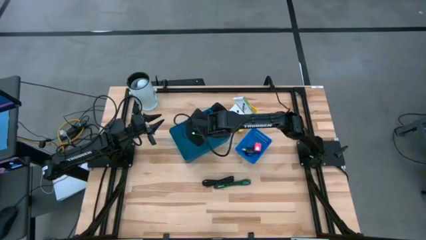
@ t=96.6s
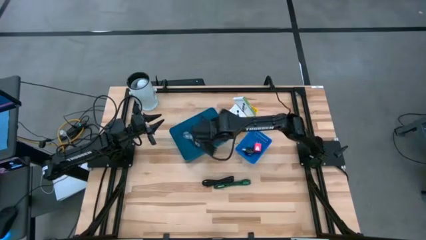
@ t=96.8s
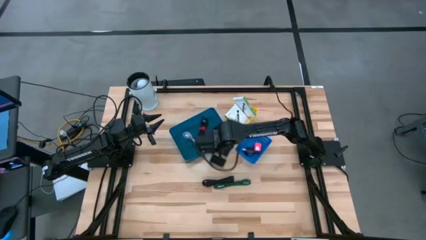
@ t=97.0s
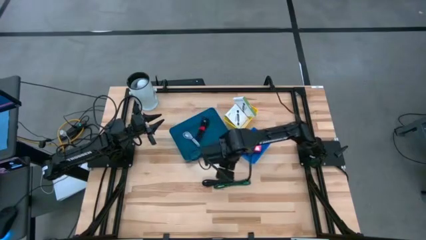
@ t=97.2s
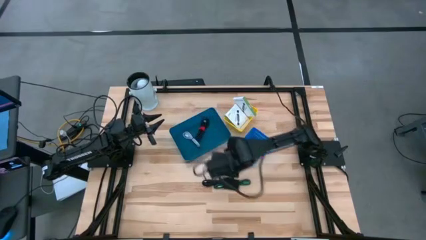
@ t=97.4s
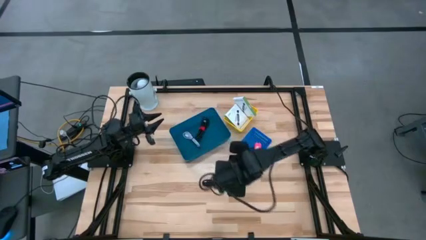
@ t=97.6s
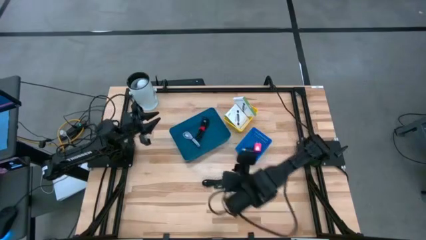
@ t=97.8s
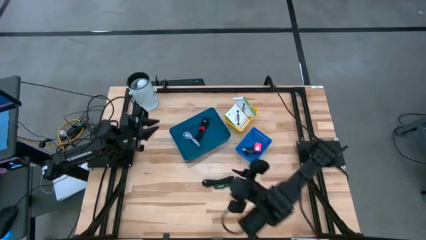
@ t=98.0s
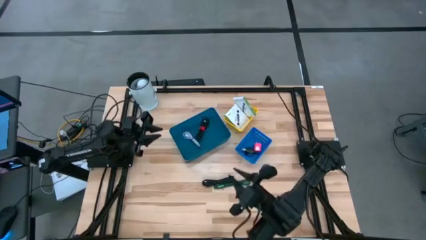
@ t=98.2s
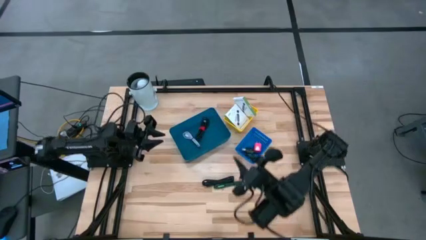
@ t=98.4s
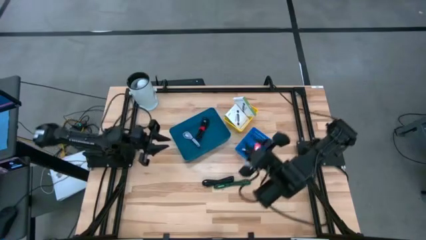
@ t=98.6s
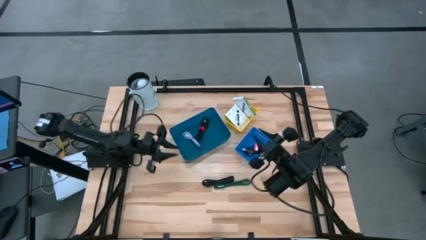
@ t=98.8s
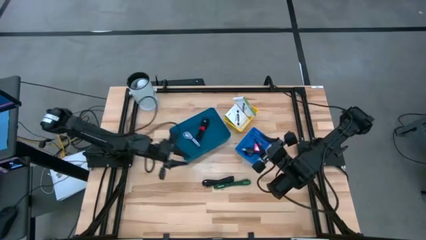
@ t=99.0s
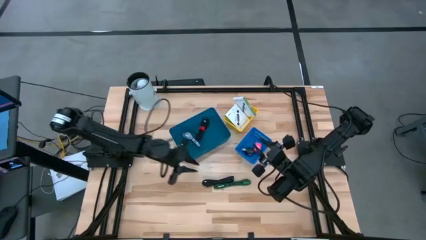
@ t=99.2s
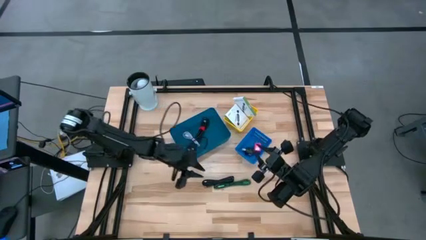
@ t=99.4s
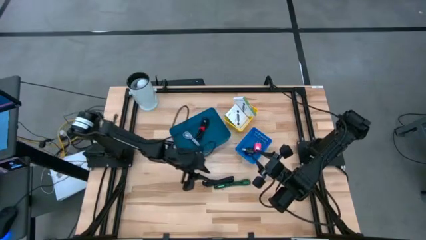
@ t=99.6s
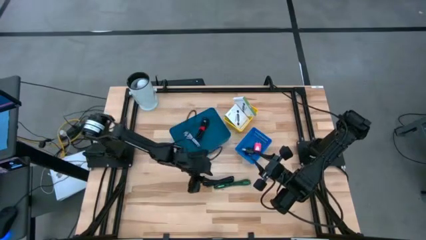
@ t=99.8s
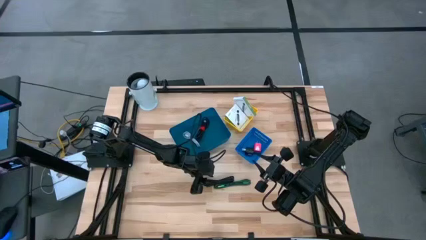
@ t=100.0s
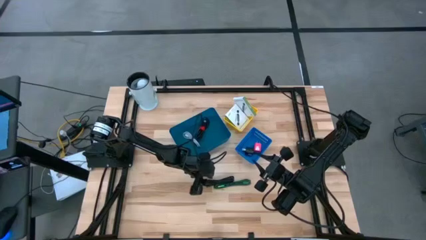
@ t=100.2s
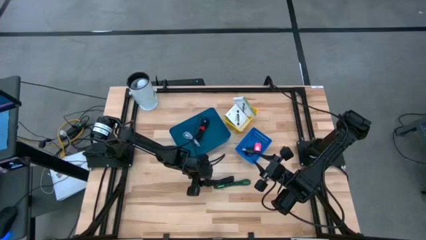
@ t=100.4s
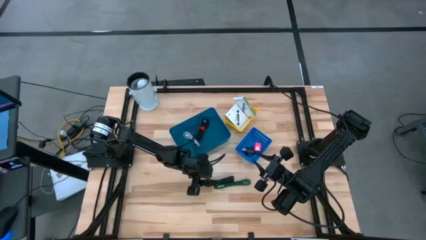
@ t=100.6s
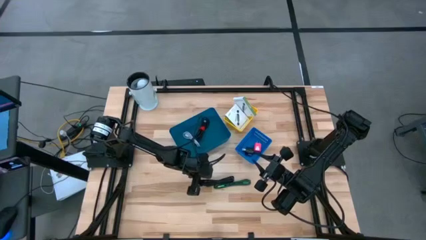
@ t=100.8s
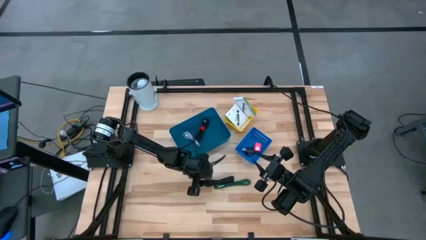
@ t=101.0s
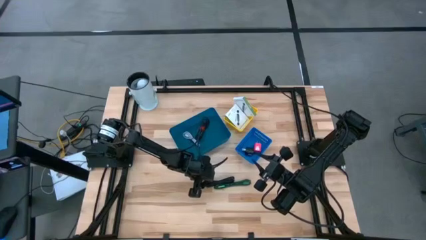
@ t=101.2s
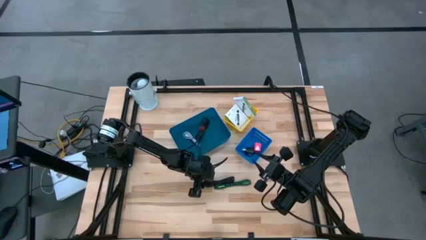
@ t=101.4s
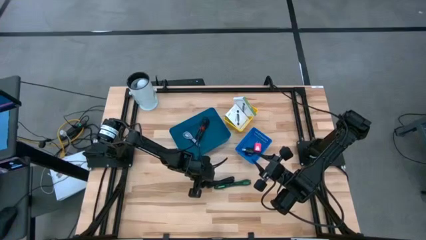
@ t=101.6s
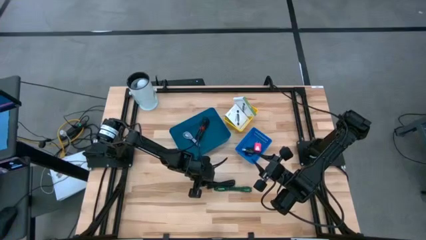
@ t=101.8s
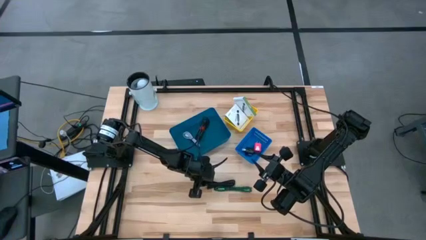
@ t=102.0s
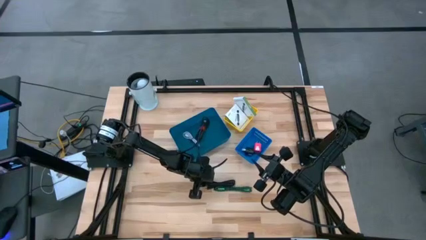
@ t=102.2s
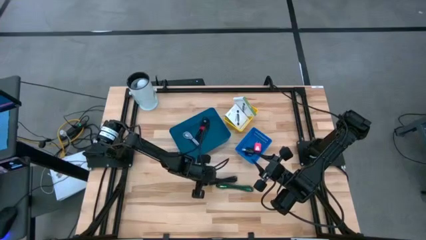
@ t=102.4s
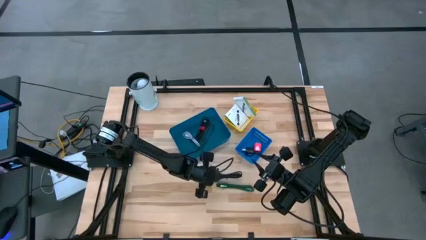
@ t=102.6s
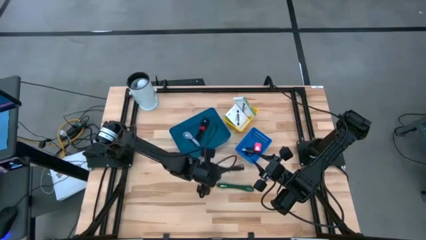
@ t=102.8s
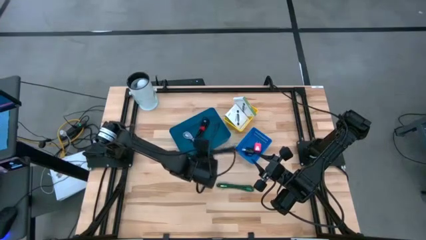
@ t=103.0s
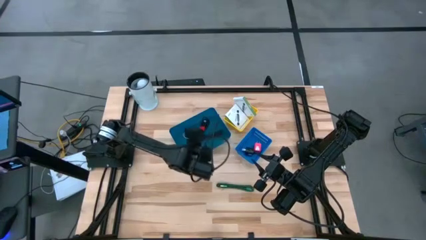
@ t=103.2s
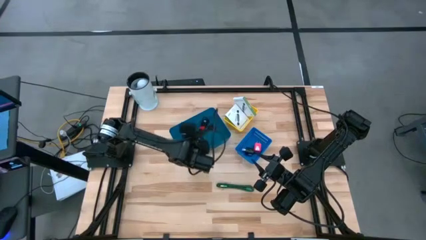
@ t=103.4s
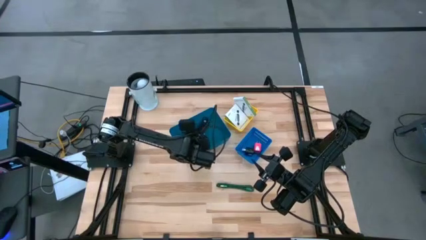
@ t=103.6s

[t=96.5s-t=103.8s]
Task: Pick and place items into bin
Put the black charger cable into the dark blue bin

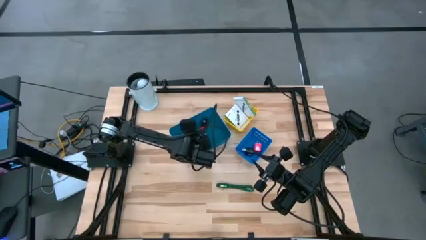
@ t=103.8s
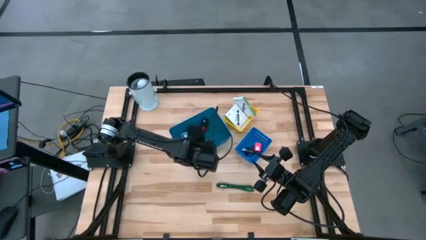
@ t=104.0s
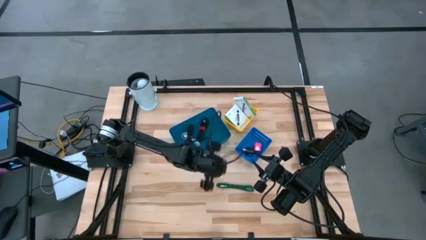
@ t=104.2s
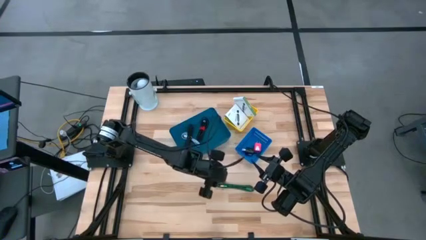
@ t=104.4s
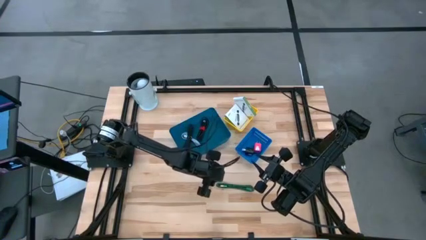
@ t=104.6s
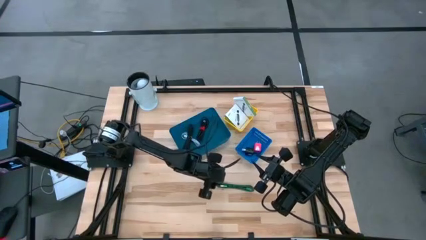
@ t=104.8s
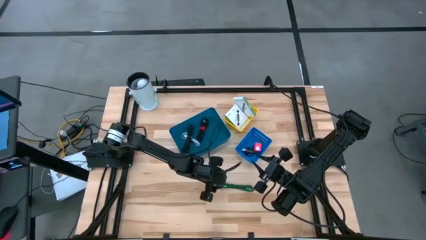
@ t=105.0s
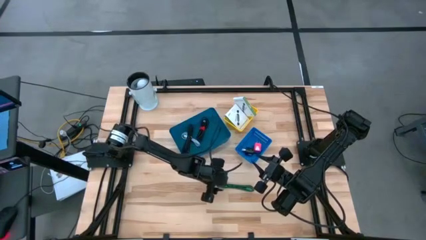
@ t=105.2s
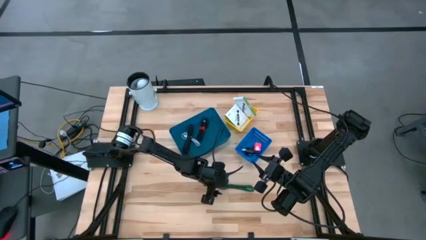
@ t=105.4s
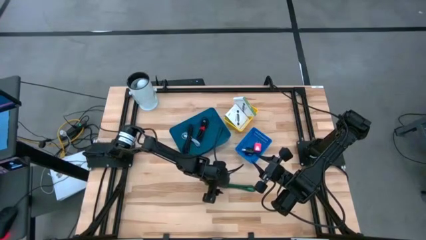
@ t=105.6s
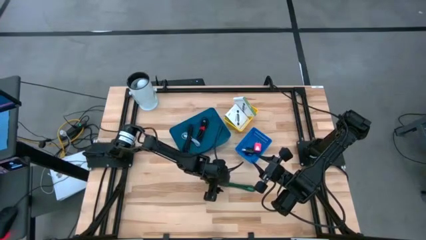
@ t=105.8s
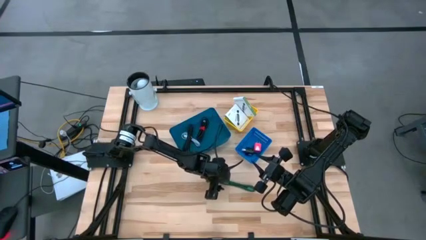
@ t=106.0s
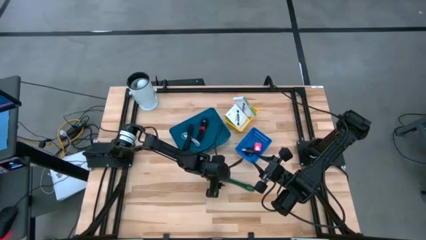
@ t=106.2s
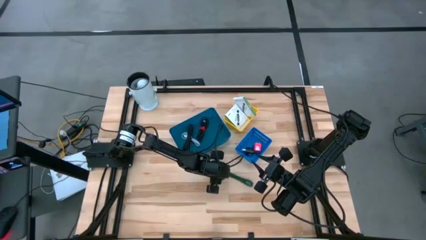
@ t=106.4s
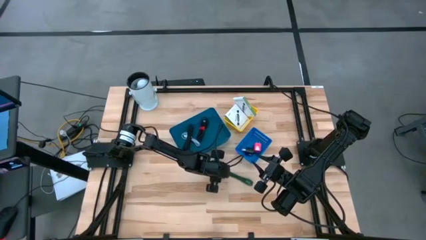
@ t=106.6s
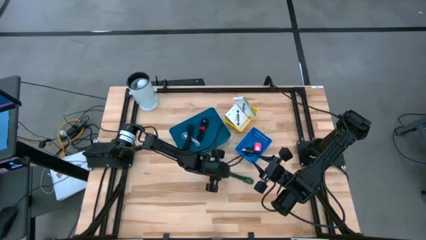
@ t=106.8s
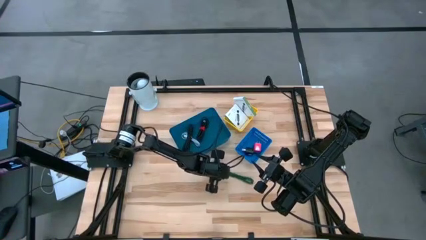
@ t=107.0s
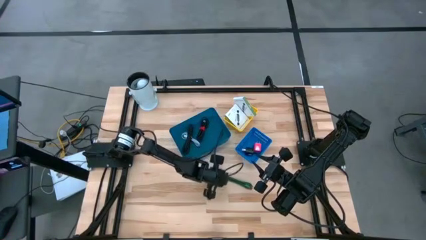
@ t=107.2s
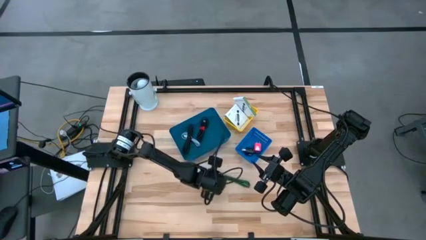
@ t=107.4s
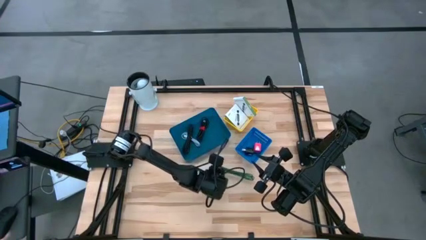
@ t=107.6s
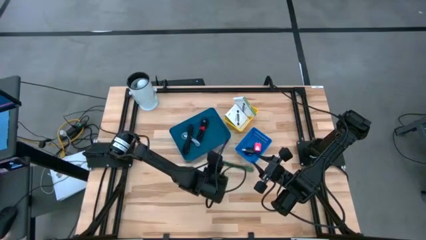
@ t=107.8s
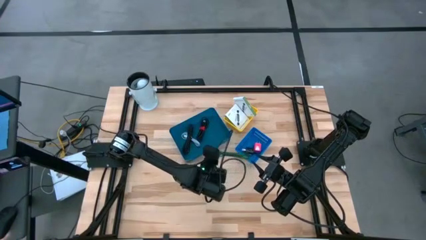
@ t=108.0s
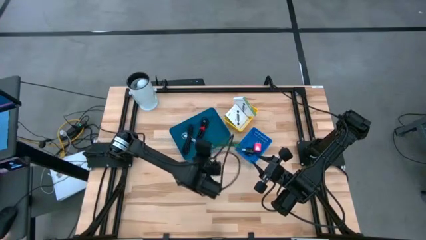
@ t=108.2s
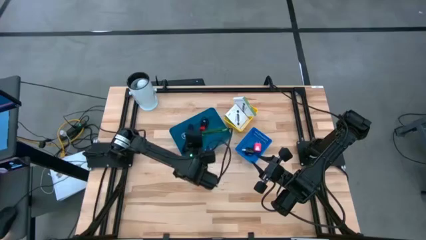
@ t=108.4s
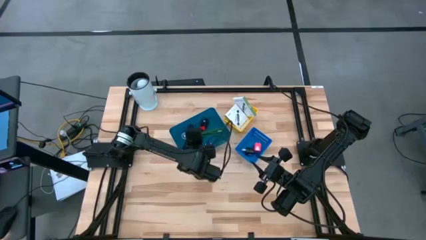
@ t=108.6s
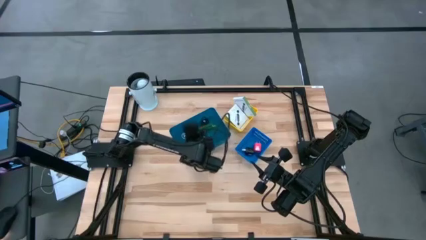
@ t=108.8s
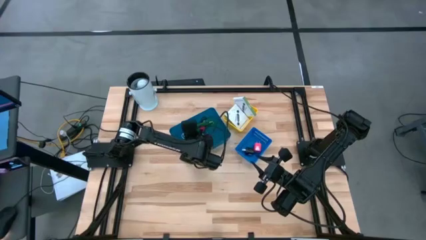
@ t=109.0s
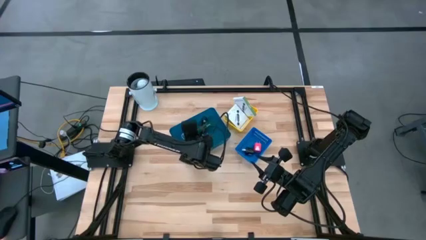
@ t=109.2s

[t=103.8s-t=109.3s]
Put the green charger cable into the dark blue bin

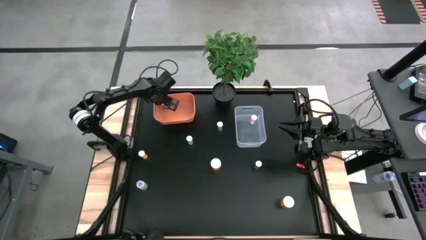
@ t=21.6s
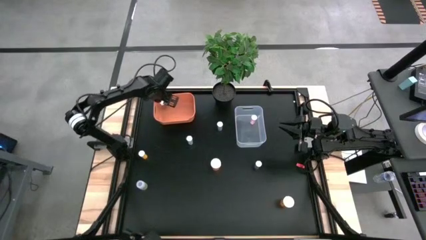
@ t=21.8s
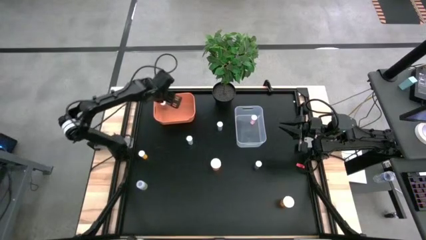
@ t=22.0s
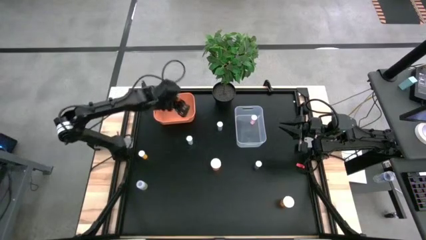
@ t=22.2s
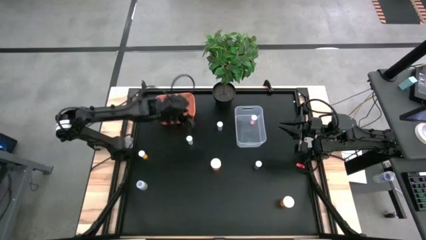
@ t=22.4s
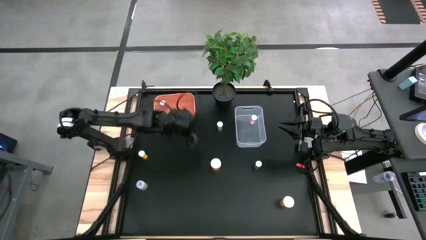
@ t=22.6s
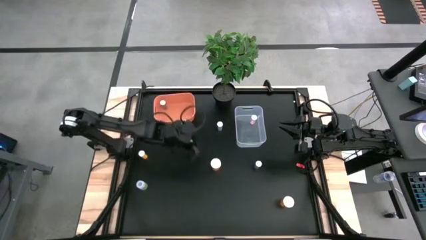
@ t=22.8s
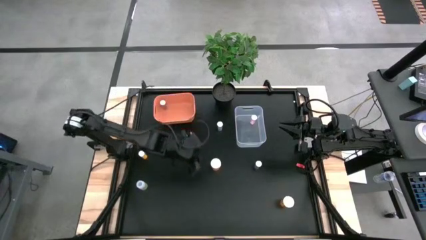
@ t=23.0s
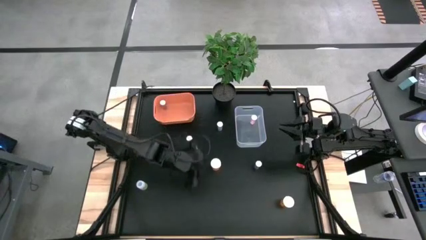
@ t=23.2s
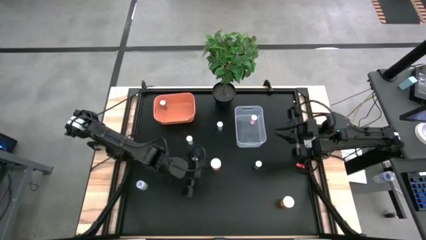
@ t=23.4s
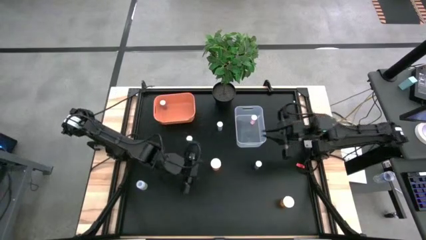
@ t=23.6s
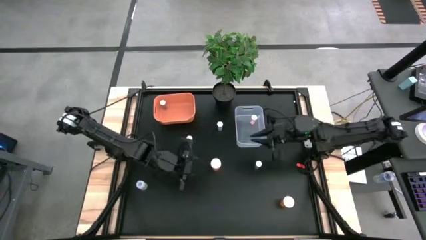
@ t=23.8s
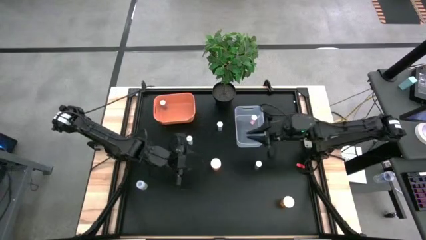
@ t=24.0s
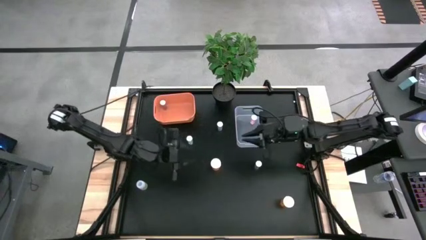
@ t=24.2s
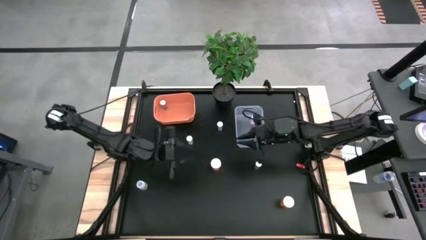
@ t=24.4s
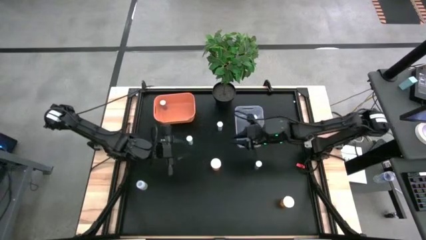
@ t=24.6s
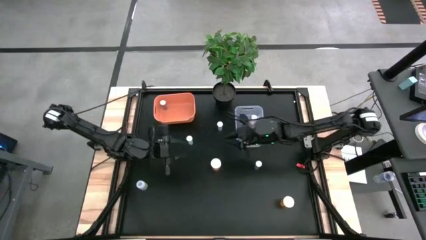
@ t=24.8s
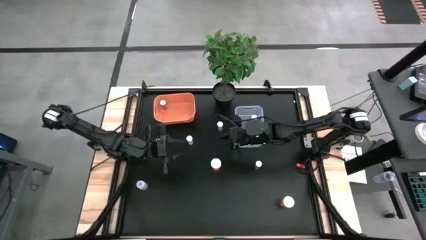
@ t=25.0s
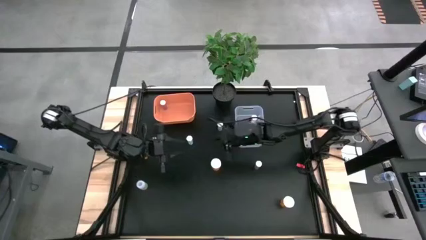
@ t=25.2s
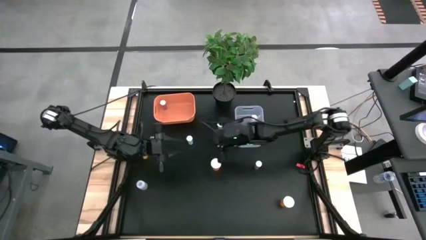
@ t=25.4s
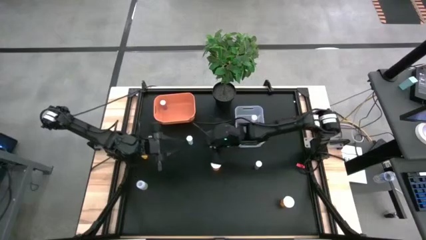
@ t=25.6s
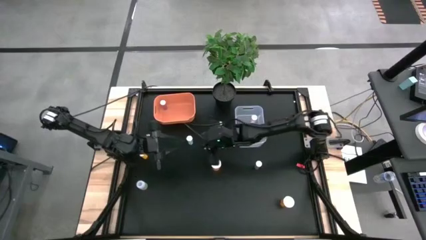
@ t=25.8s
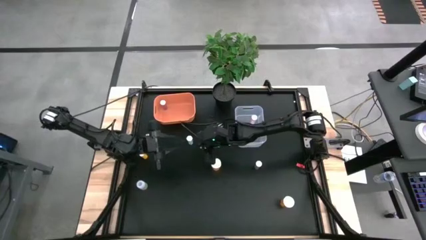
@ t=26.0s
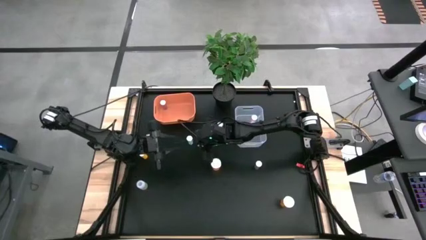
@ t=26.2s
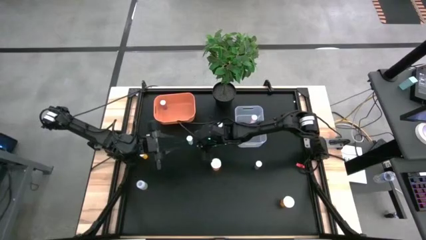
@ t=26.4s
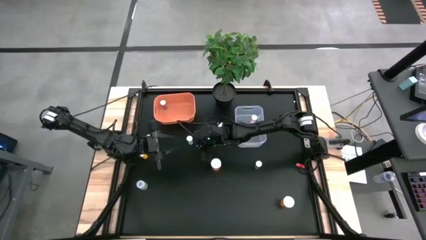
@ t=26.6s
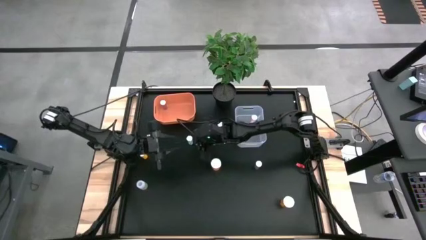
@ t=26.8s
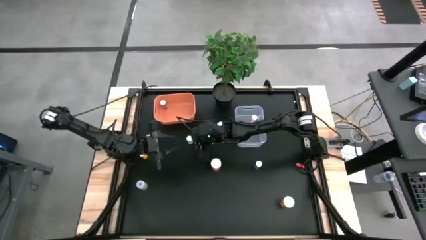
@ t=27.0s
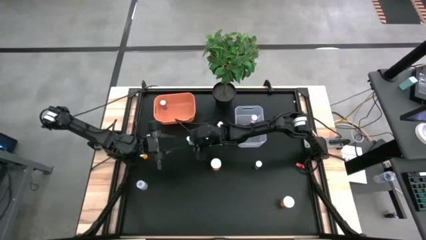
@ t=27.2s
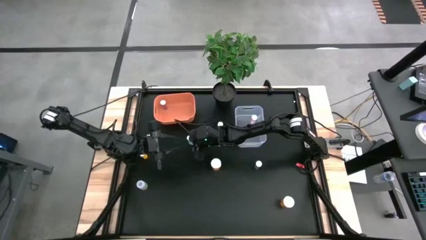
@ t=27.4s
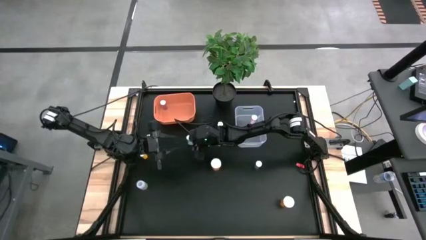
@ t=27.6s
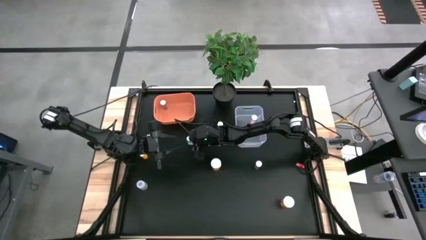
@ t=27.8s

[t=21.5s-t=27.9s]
Task: Pick and place medicine bottles into bin by pill shape (circle, oval)
Put the blue capsule pill bottle into the transparent bin
